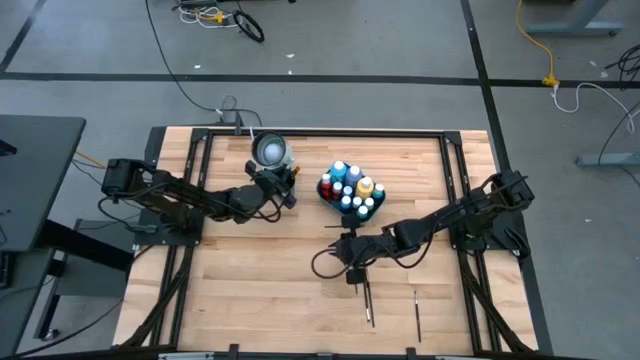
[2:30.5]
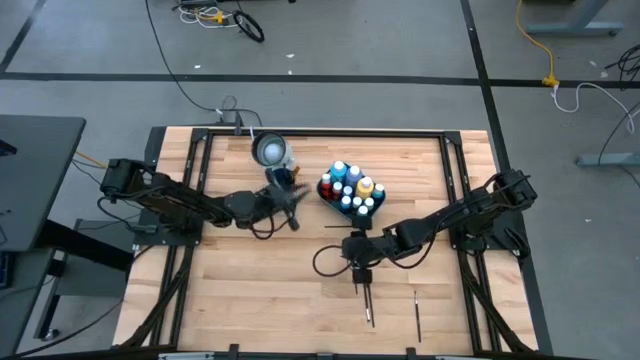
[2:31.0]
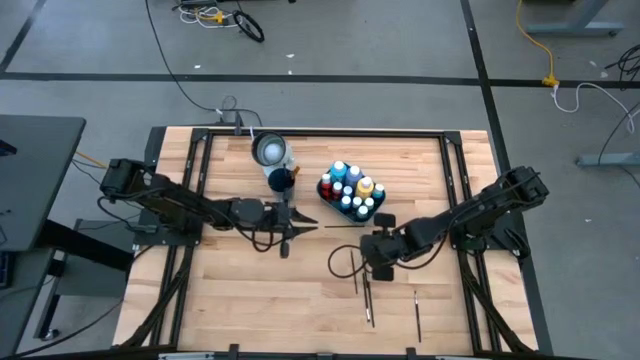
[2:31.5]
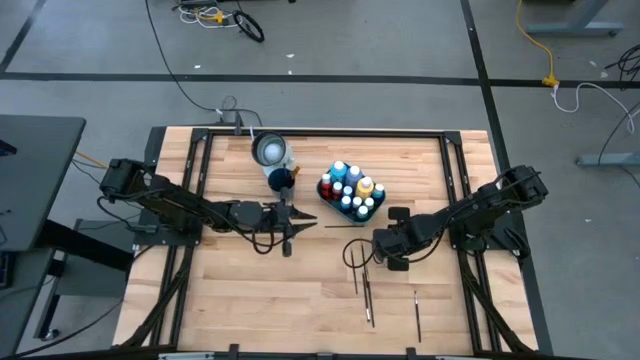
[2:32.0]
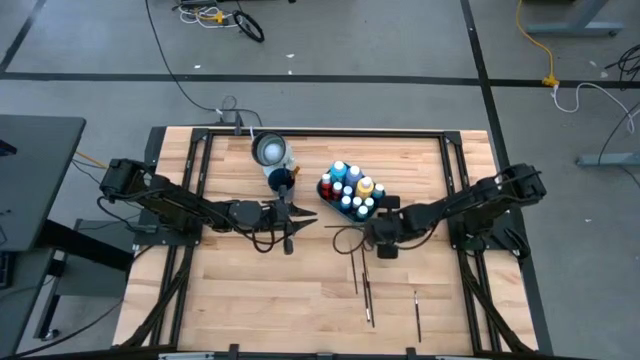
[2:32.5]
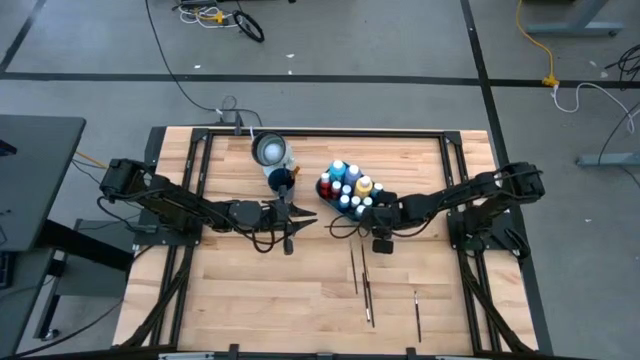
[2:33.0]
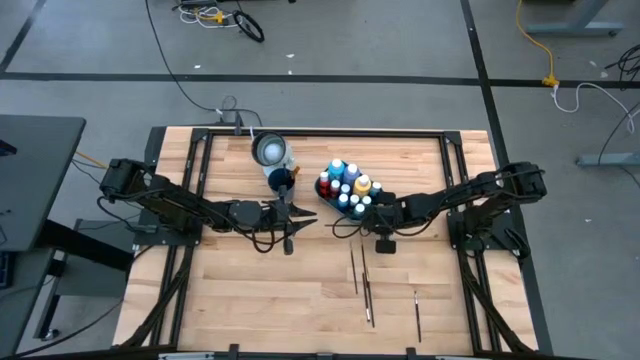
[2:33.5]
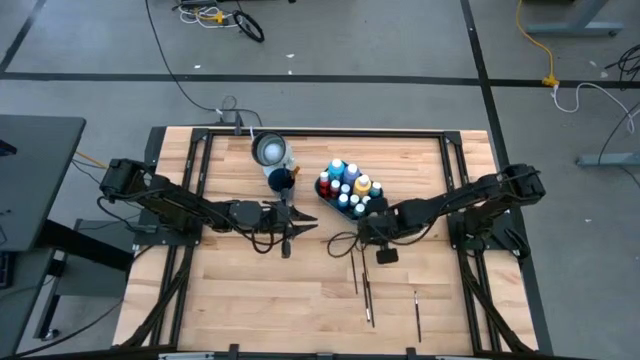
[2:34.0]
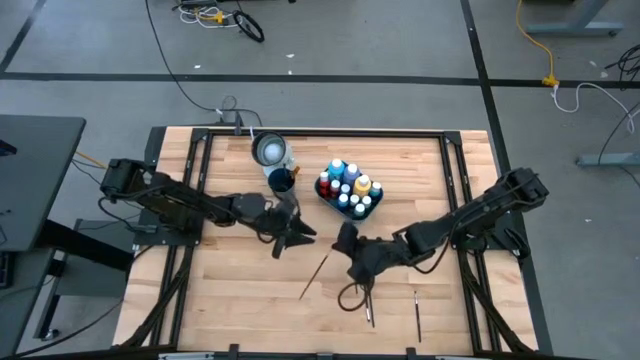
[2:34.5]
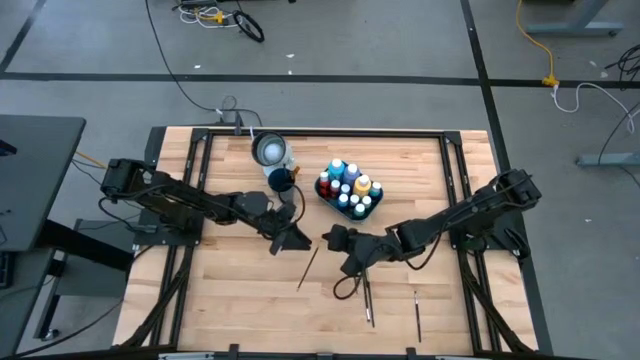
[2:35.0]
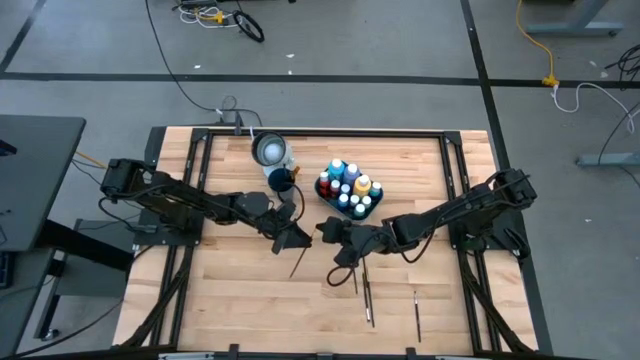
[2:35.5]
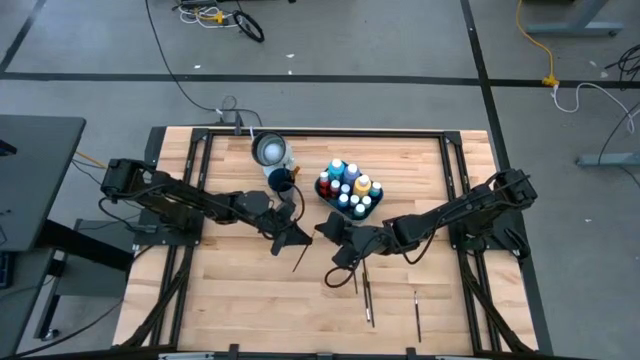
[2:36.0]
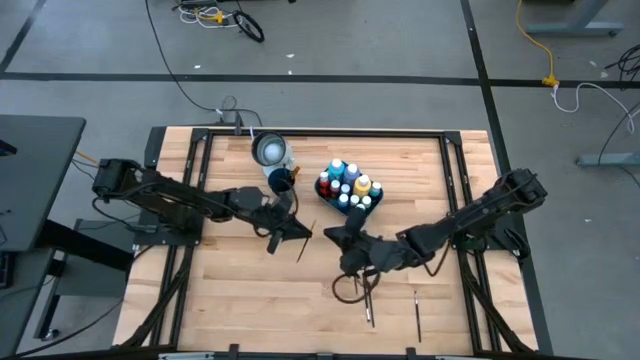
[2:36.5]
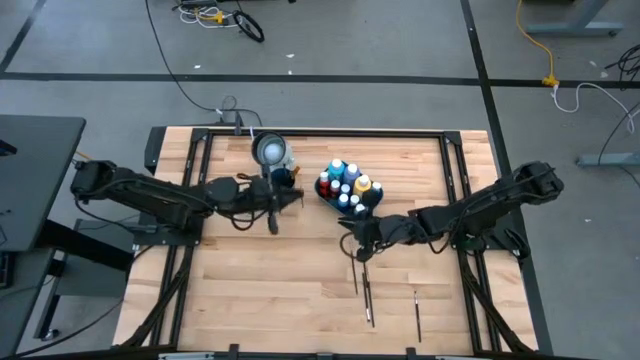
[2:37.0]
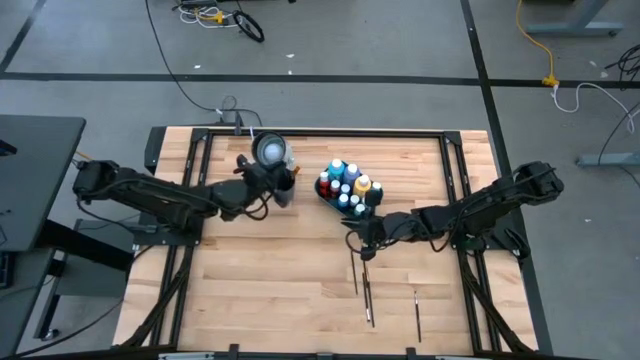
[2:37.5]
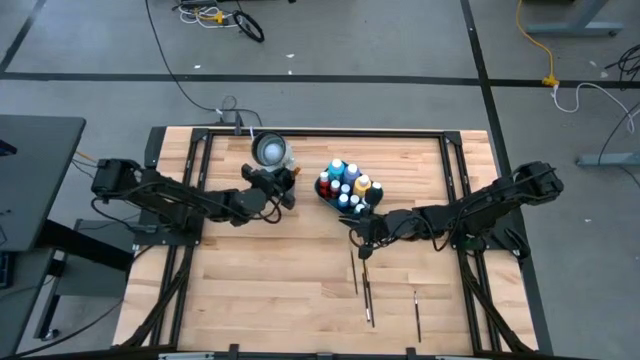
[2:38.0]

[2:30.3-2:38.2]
Task: Pick & Place Paint Supplies
Put the gold paint brush into the blue cup

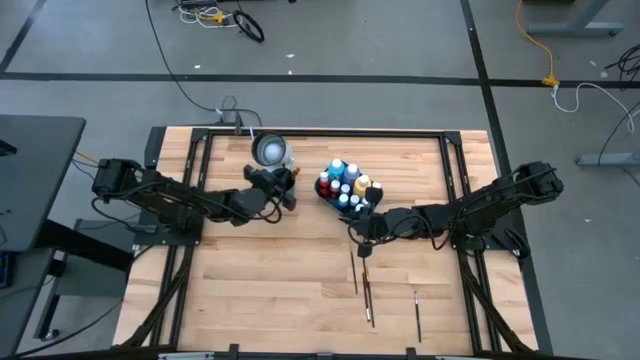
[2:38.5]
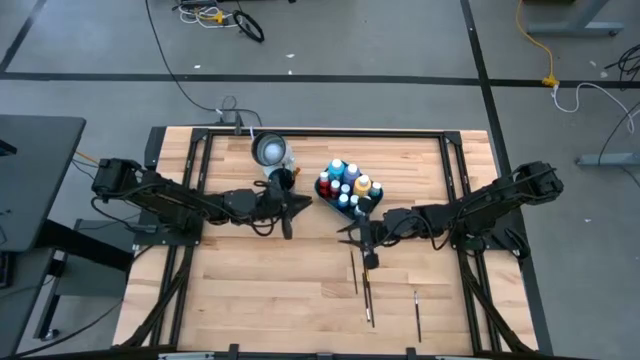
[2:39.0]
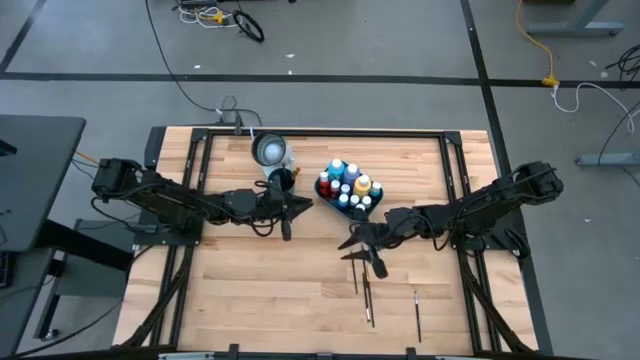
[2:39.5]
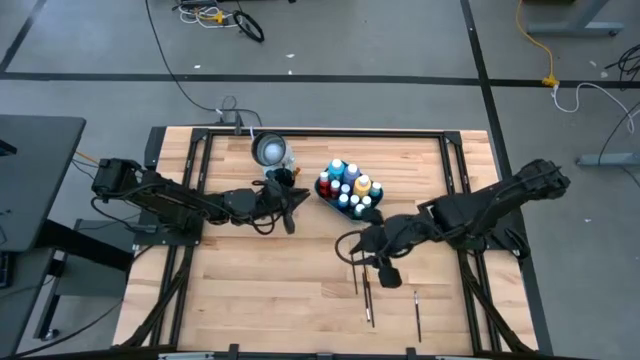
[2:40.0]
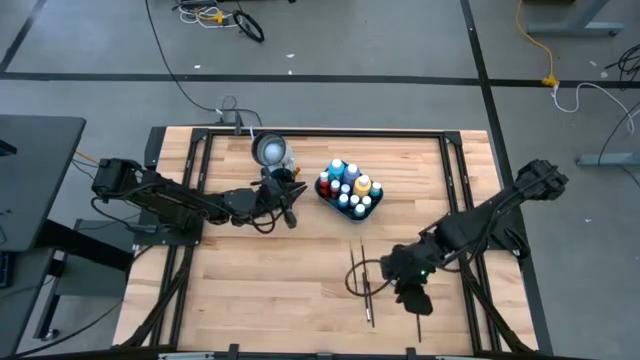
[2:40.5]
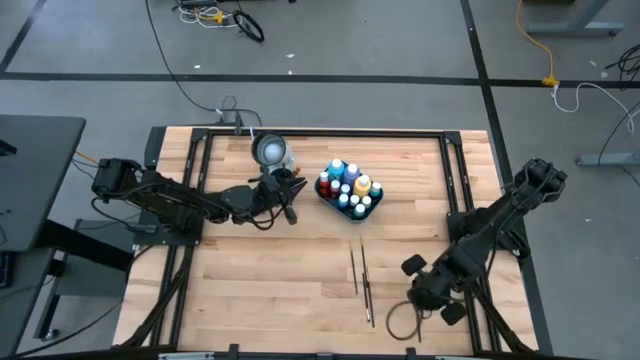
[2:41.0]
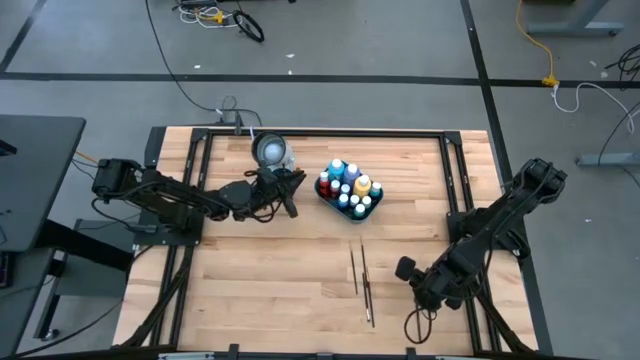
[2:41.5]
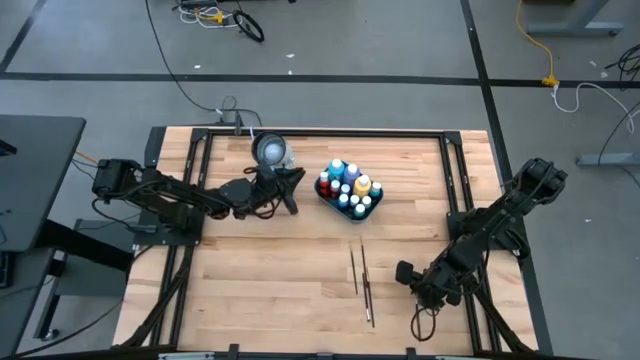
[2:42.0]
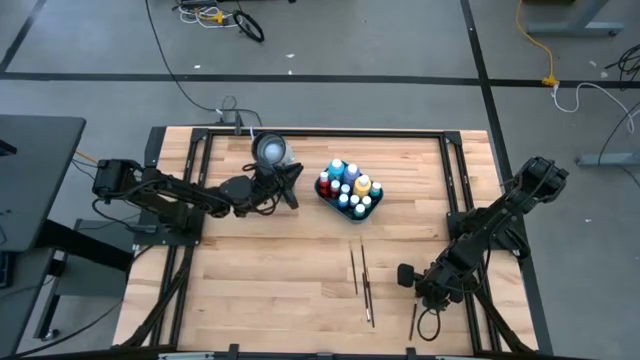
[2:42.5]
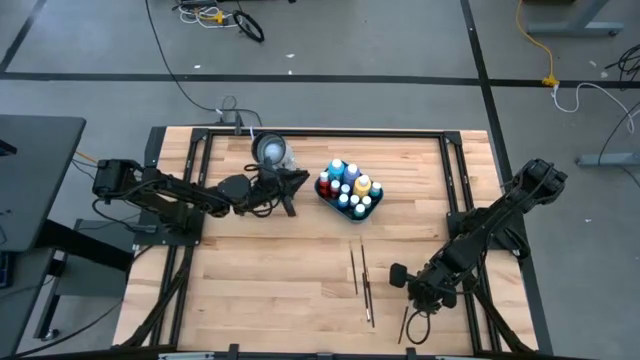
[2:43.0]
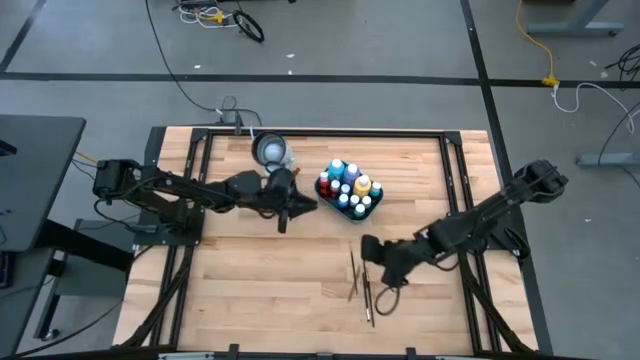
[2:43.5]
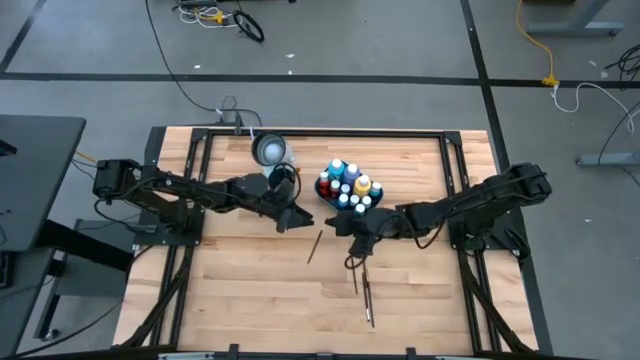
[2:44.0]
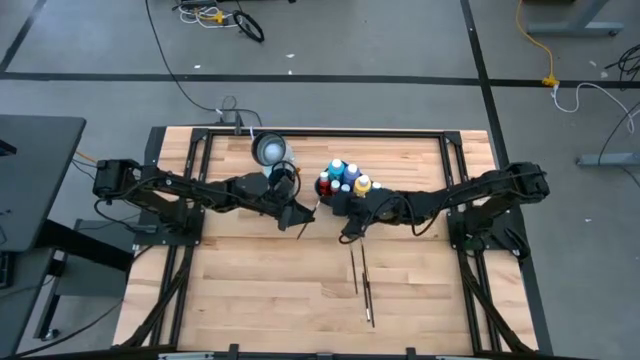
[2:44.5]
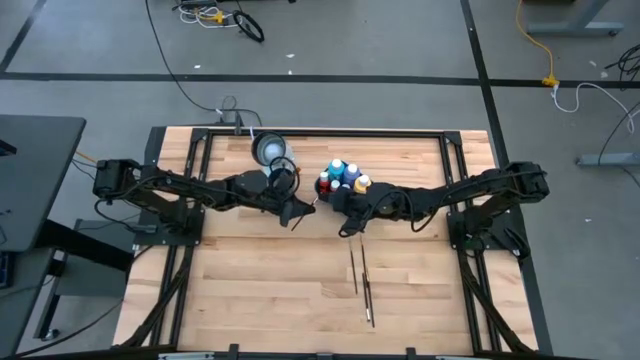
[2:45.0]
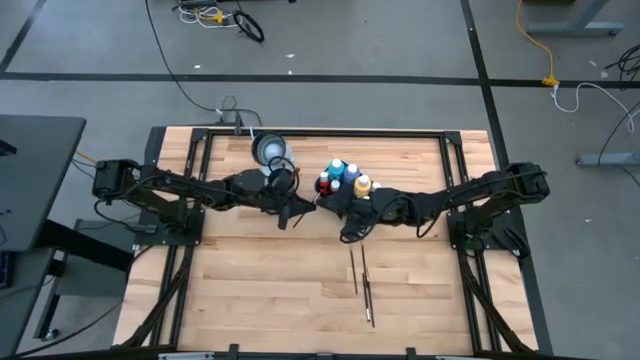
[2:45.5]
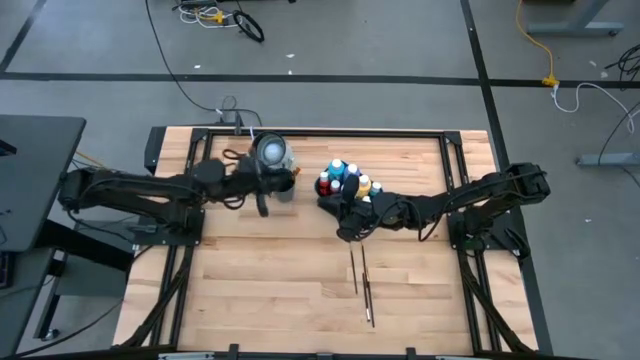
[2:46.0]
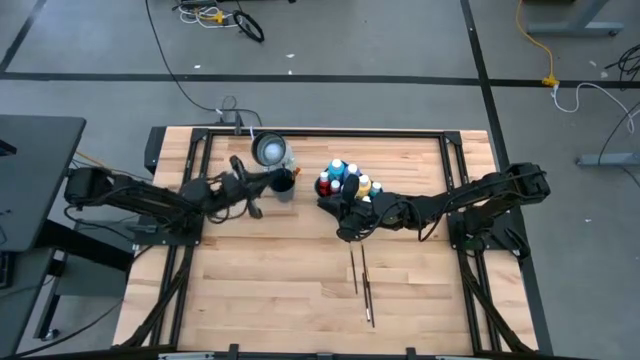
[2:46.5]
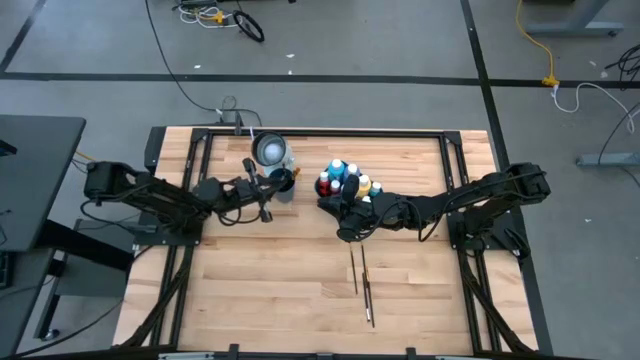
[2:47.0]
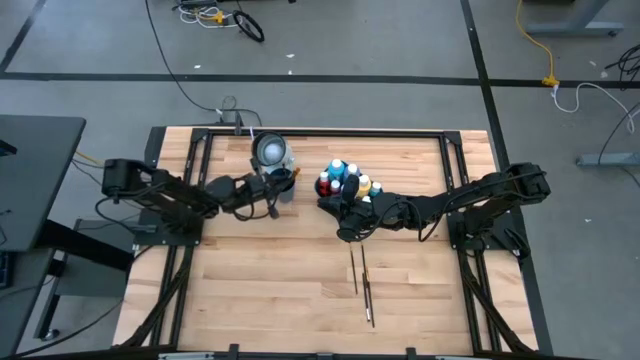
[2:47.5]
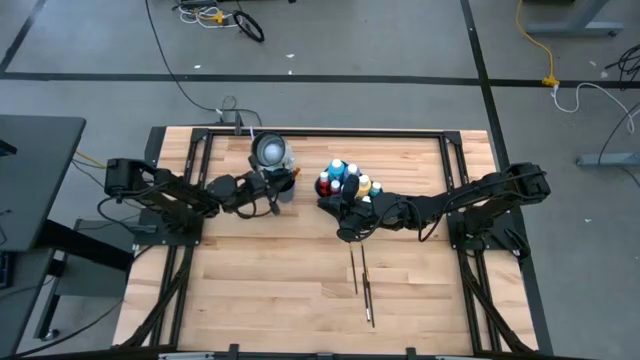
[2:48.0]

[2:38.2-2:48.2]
Put the silver paint brush into the blue cup
